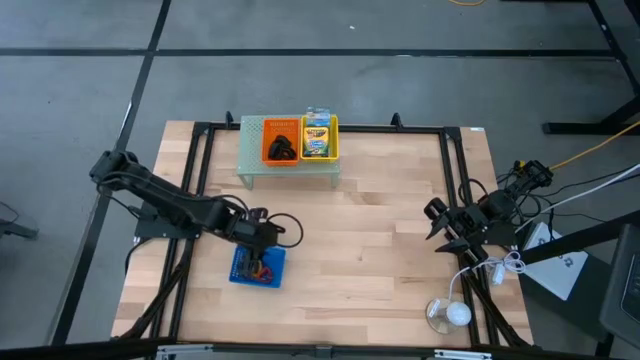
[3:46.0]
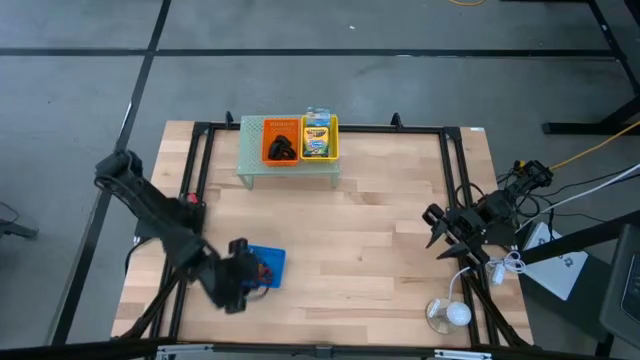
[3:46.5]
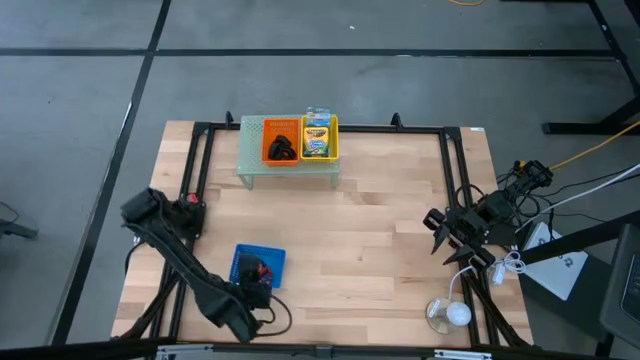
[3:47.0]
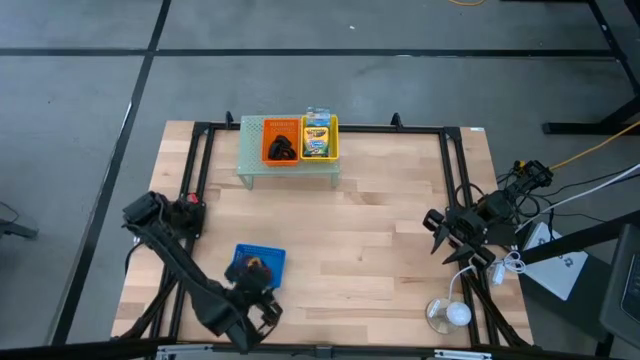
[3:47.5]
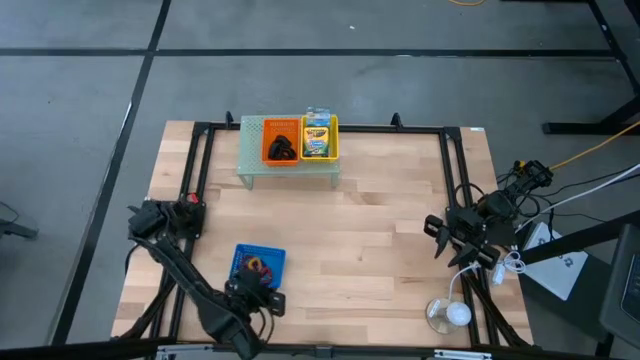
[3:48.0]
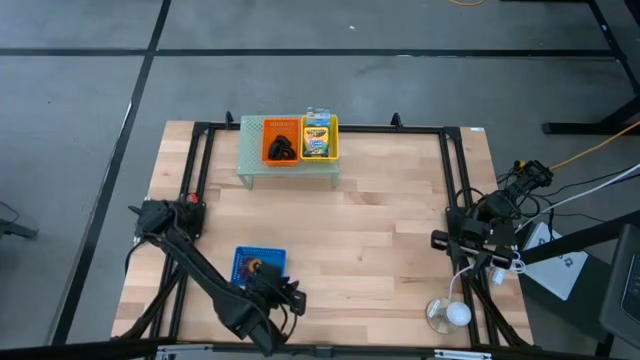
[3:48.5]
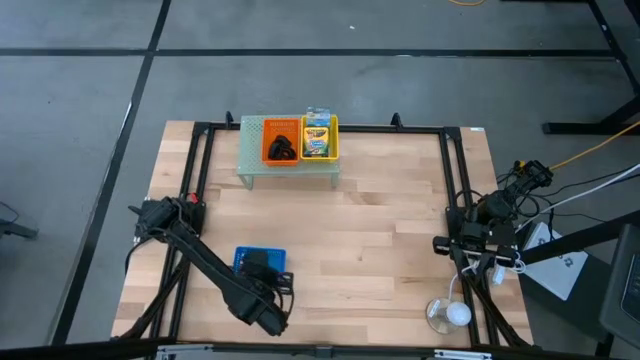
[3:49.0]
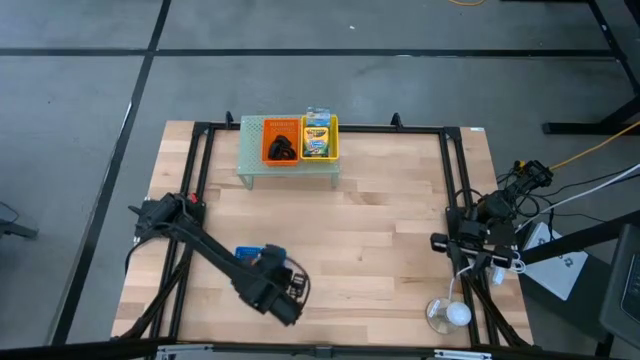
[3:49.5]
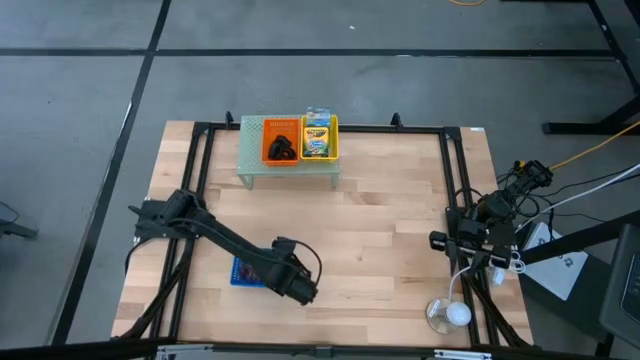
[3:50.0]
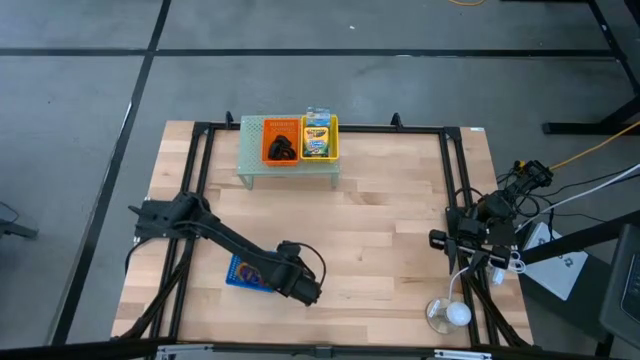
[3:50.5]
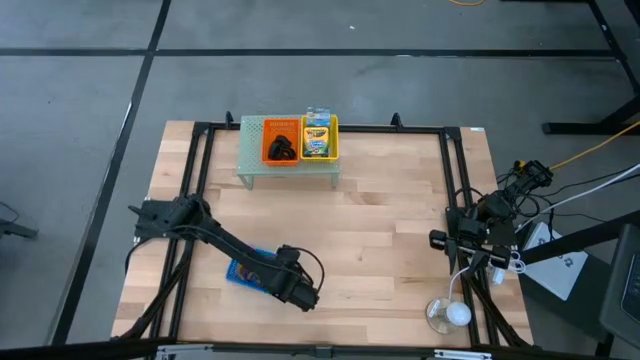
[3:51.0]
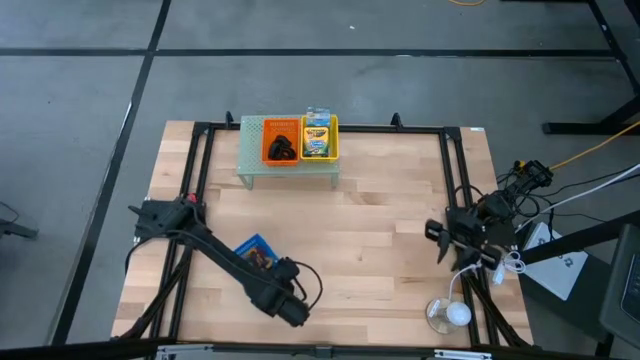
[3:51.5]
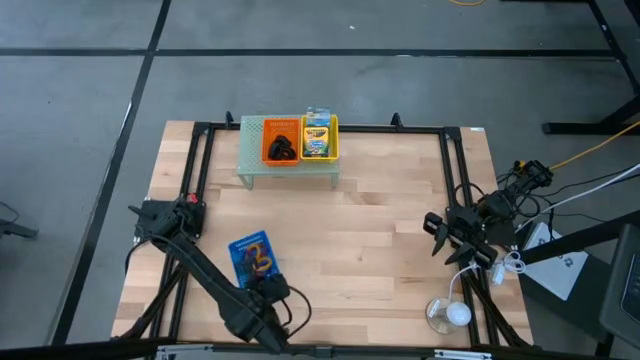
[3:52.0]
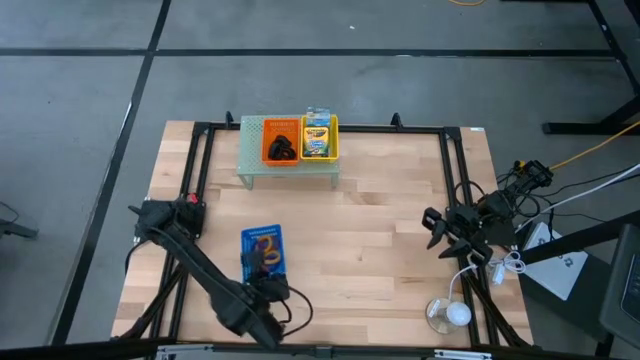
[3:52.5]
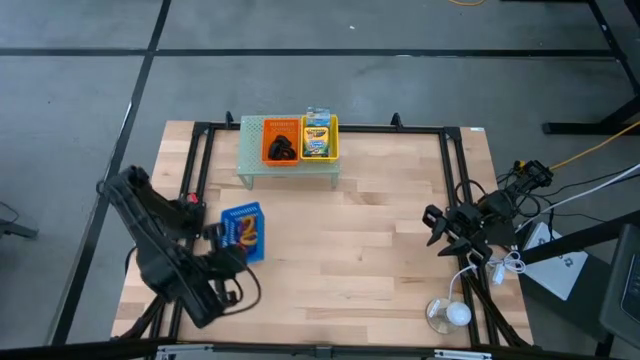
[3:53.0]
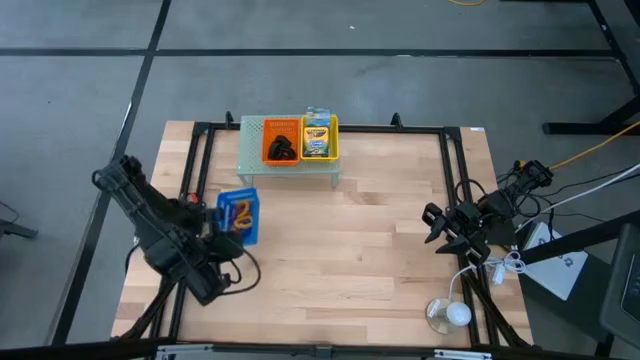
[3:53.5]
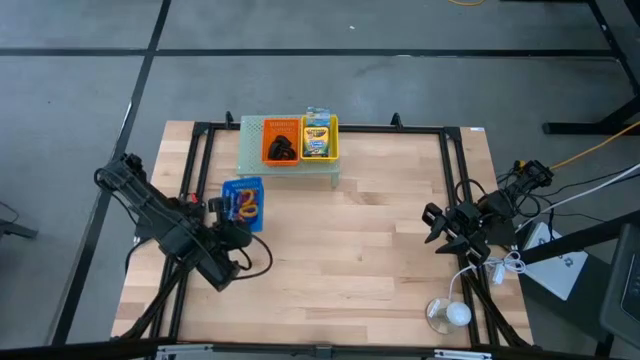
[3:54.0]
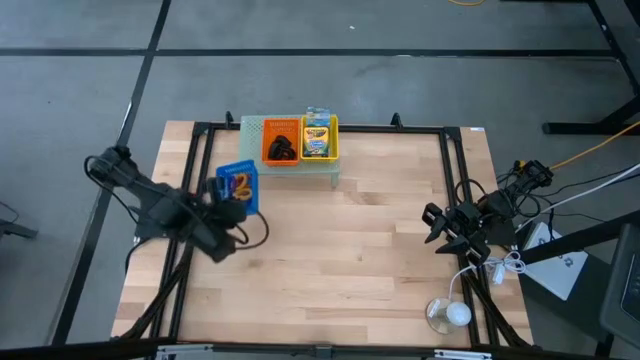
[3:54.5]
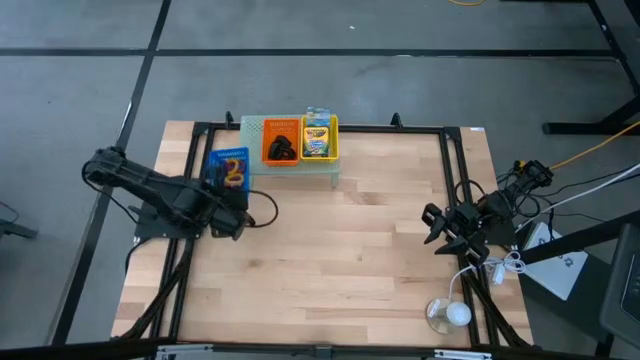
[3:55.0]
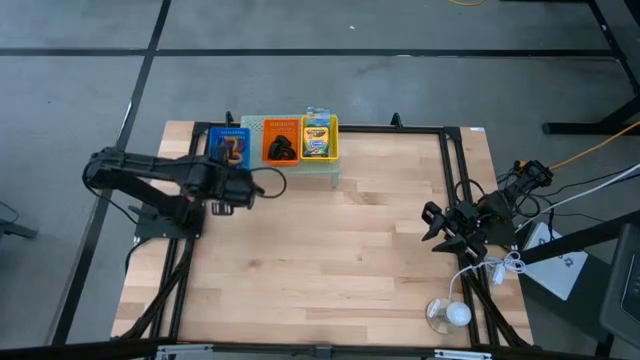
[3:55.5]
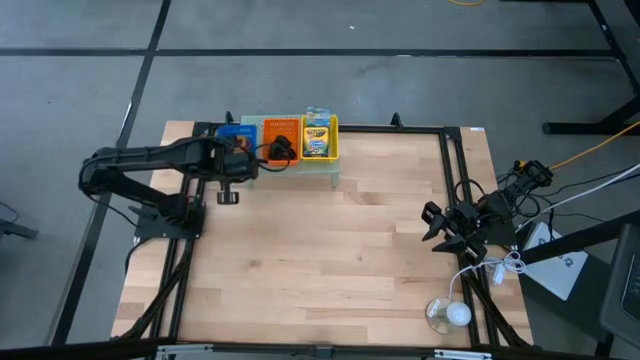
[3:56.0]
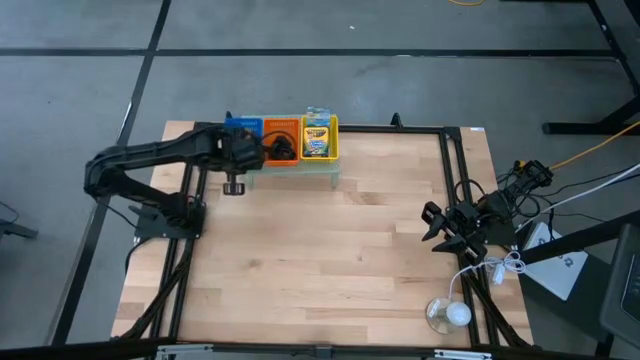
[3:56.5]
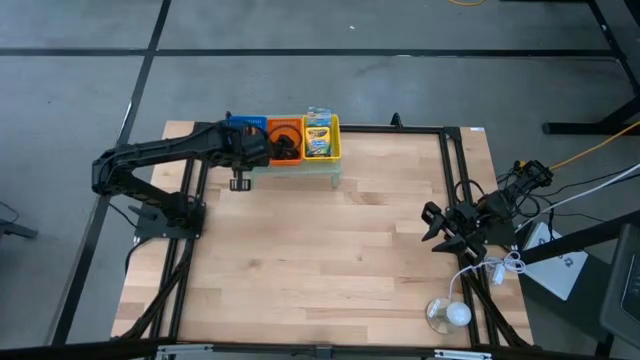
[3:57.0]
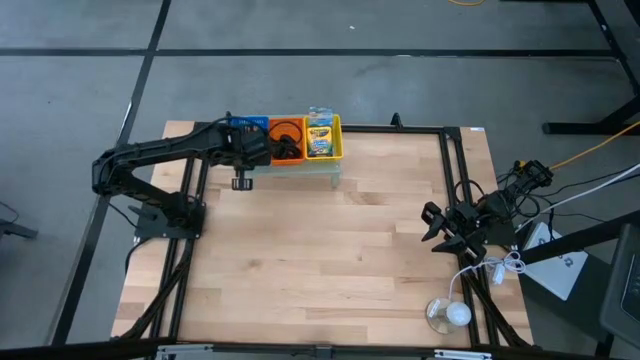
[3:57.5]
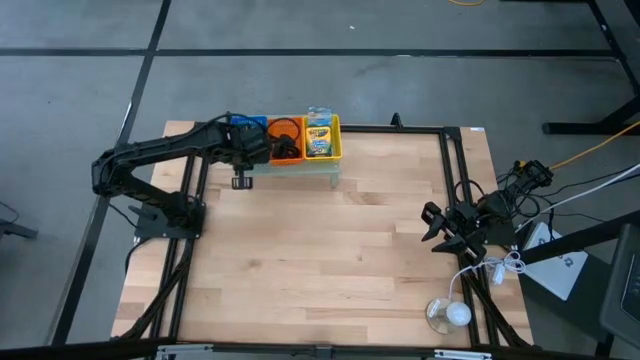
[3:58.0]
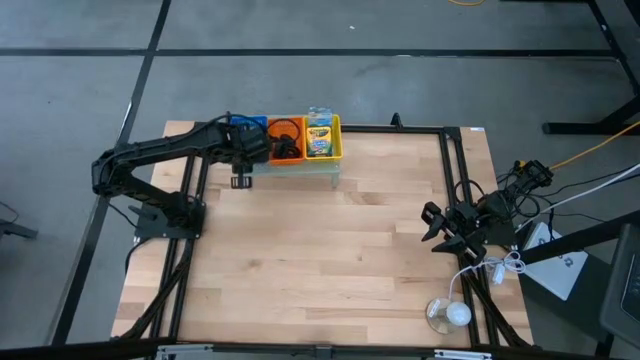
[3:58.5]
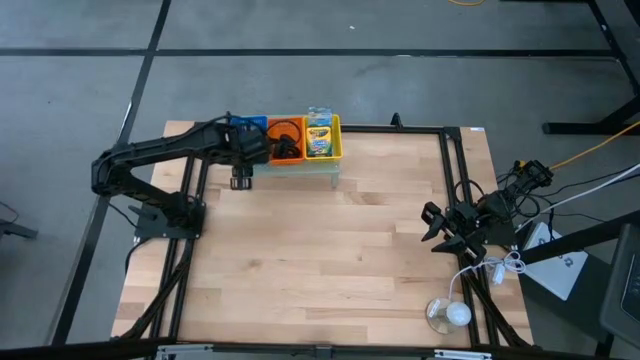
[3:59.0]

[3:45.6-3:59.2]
Task: Pick & Place Office Desk Supplies
Put the blue bin on the shelf

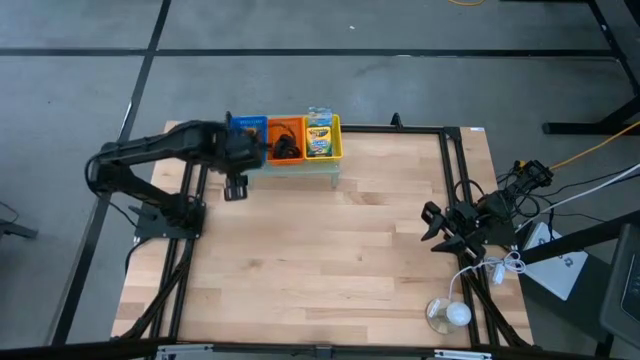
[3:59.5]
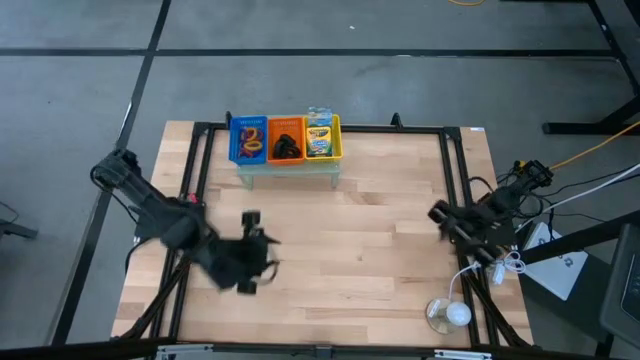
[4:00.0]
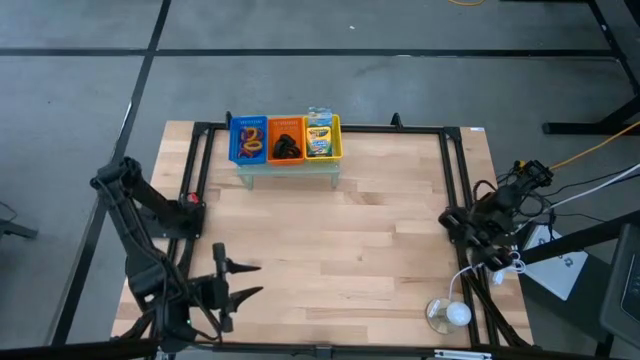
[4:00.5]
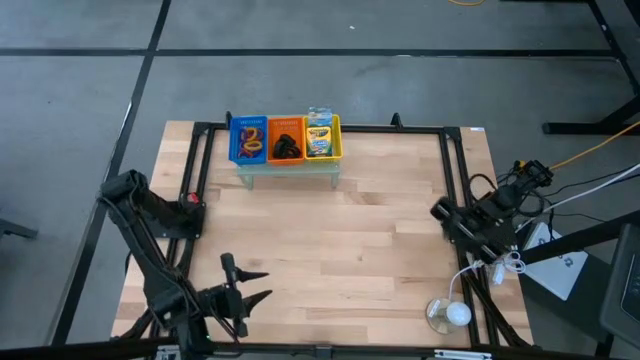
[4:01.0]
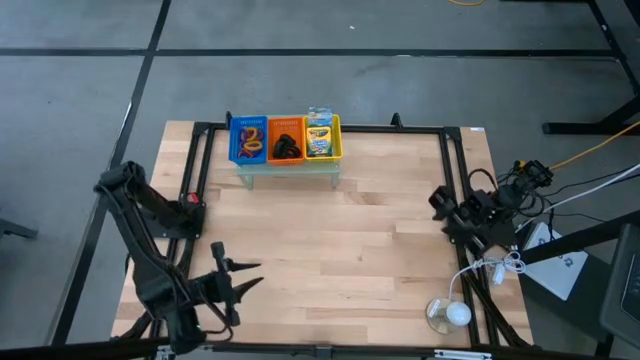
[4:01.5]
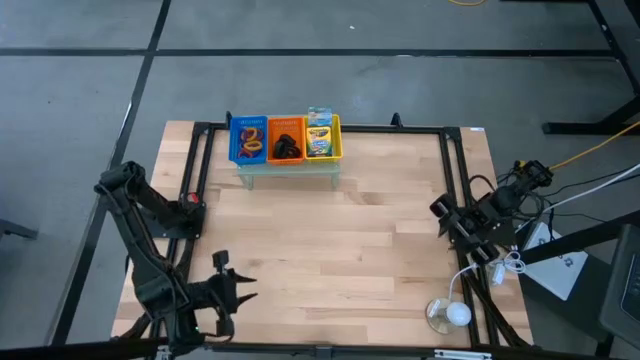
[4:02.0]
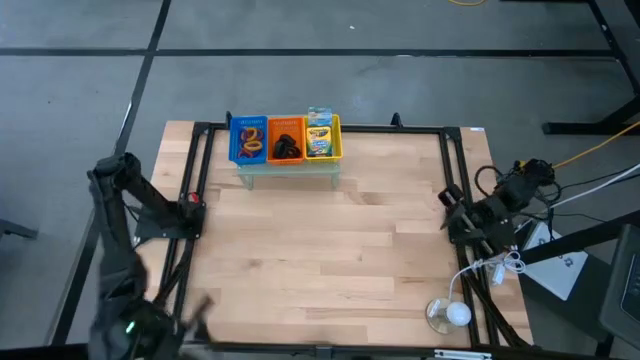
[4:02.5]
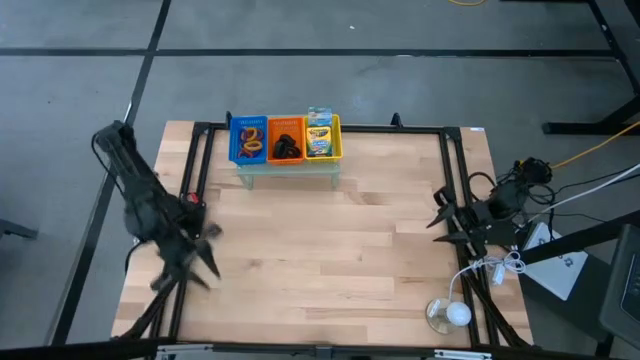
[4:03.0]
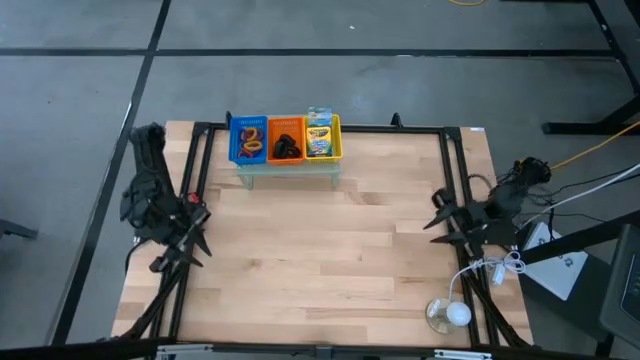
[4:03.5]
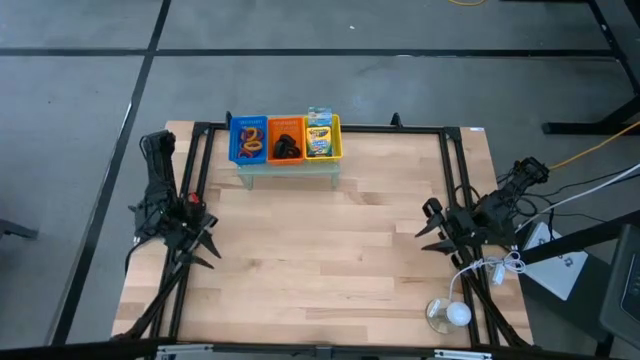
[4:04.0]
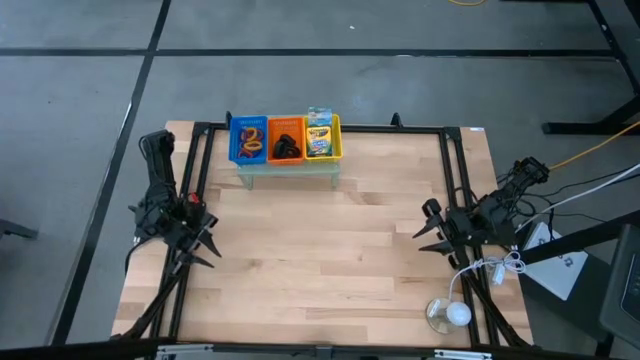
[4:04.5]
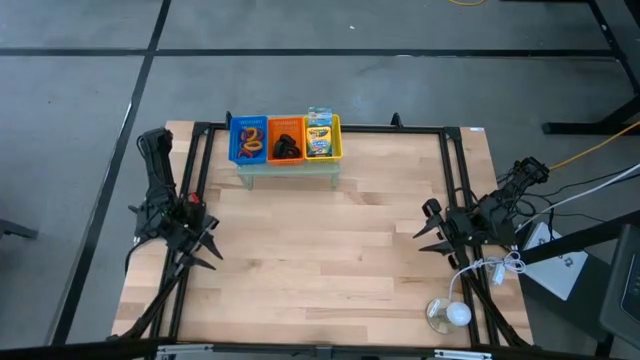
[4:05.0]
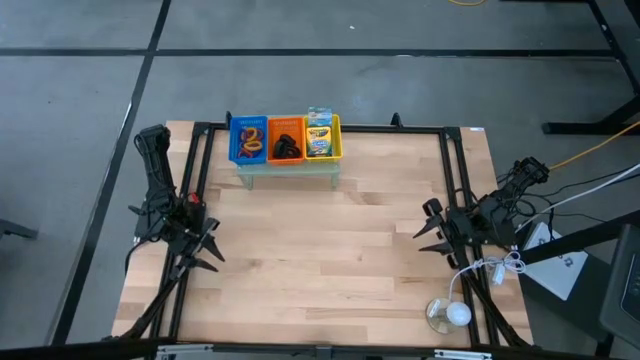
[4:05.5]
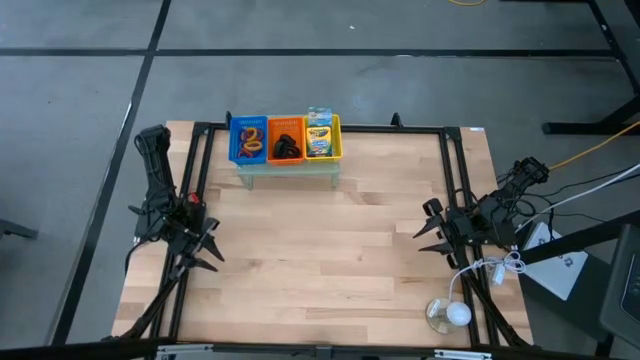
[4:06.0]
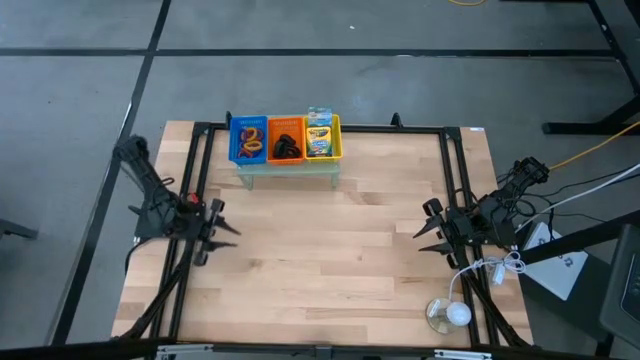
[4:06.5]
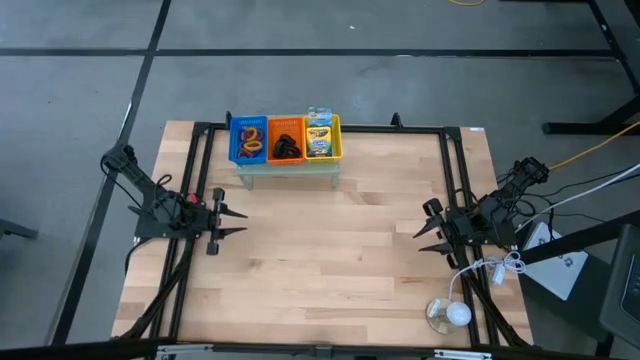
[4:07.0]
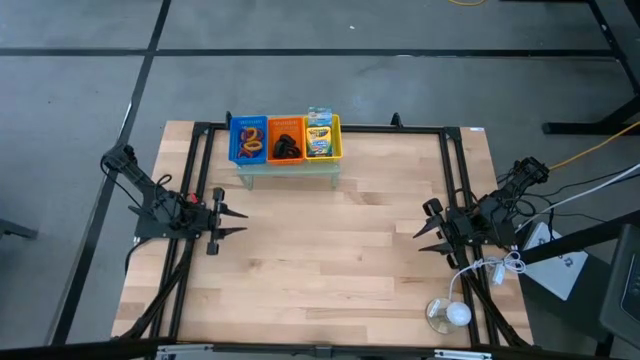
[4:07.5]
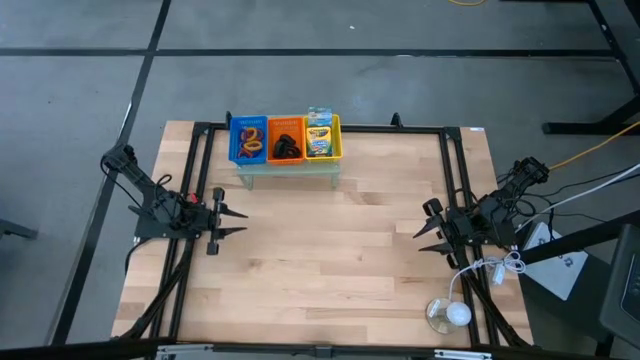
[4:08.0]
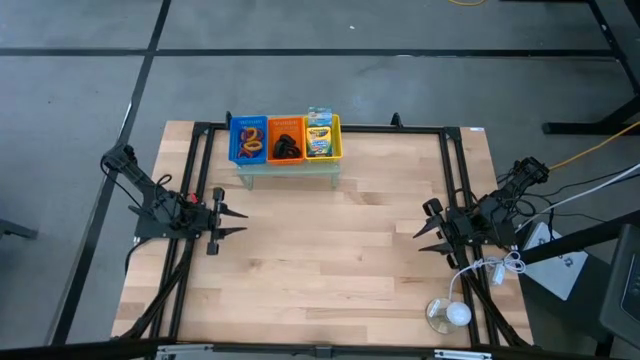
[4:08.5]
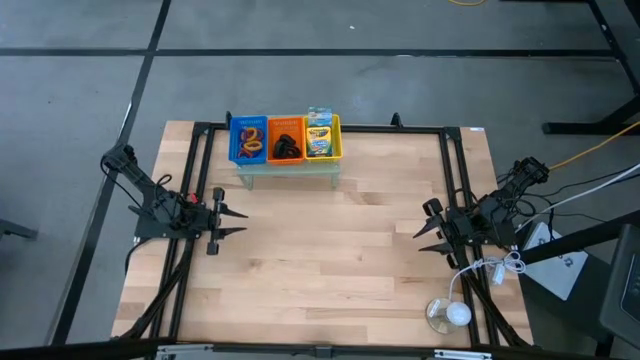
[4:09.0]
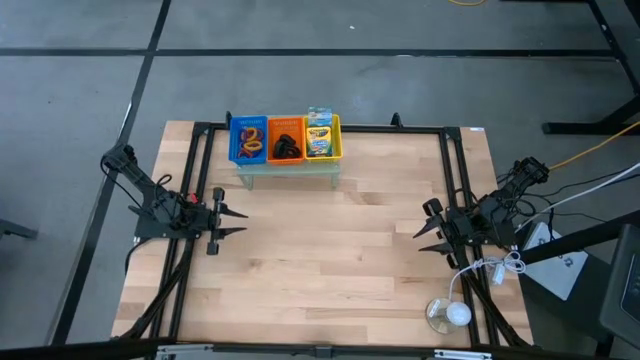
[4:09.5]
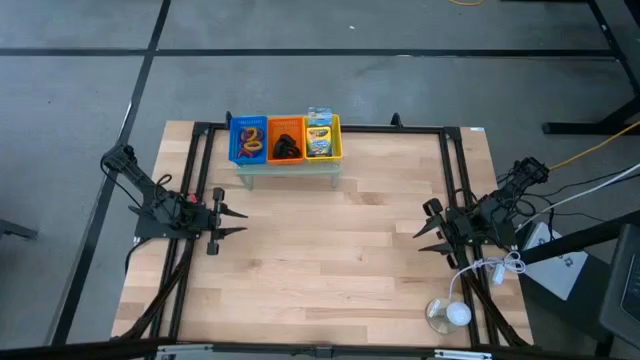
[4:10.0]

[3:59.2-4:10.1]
Return to Home Position
